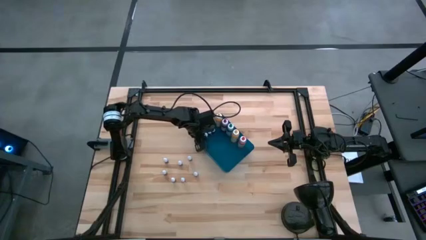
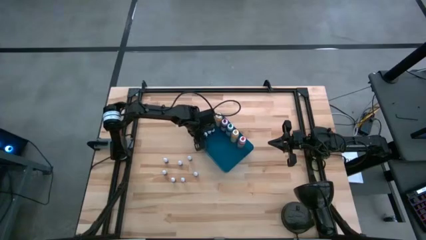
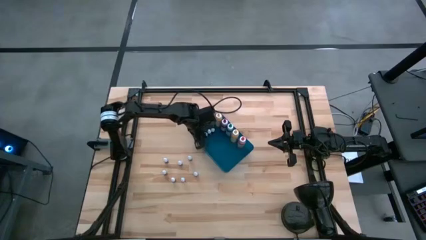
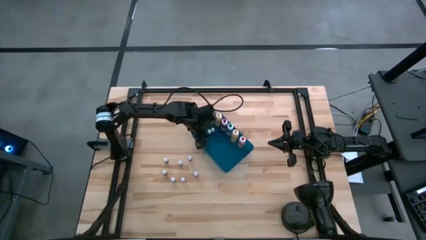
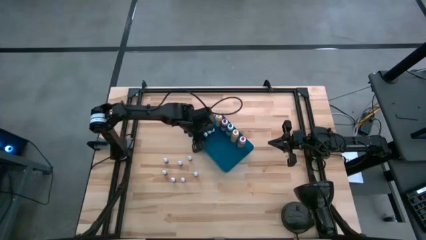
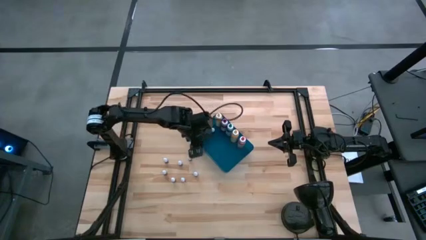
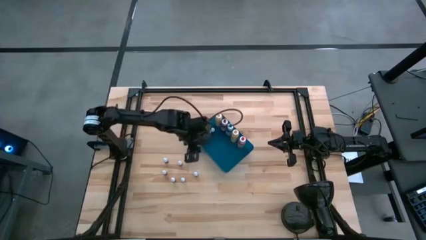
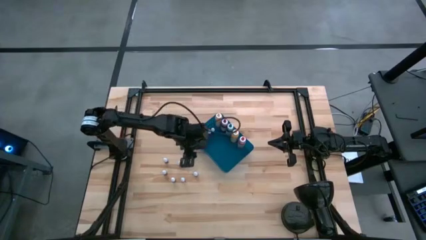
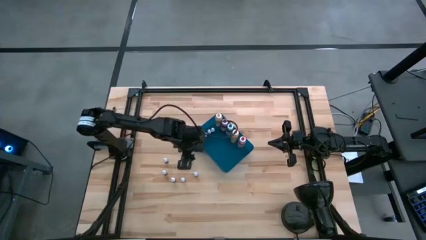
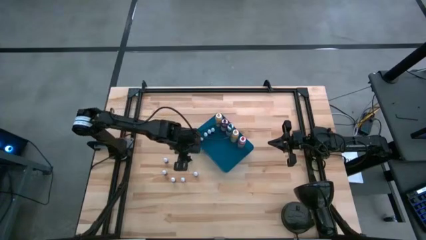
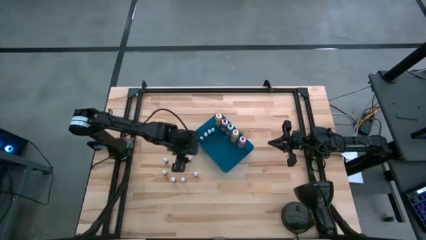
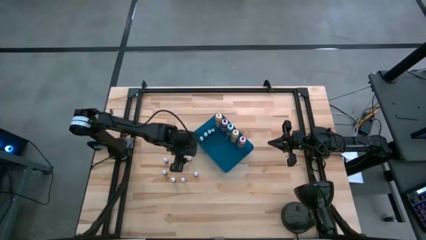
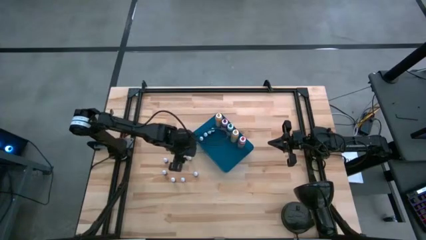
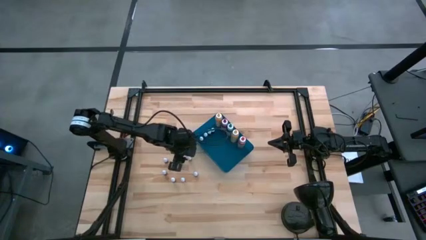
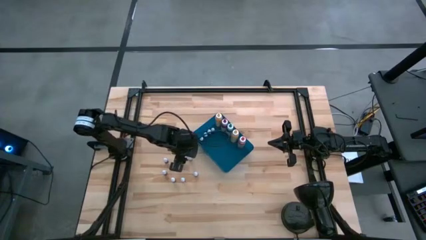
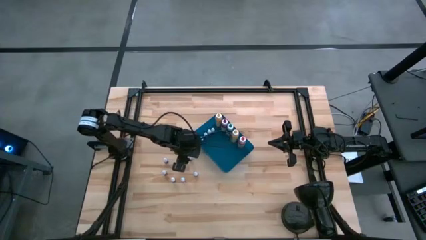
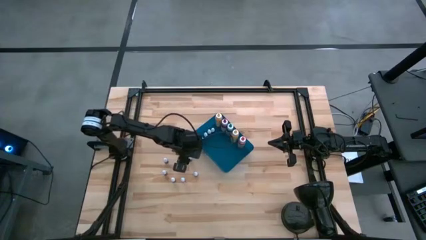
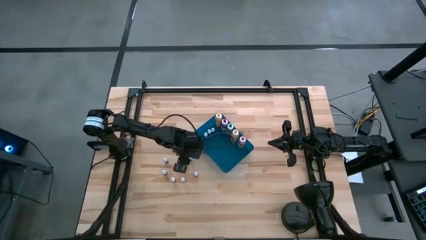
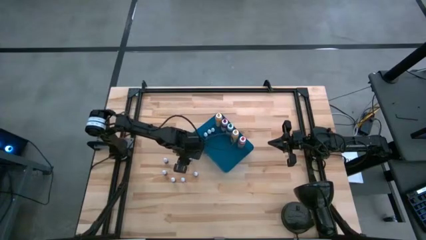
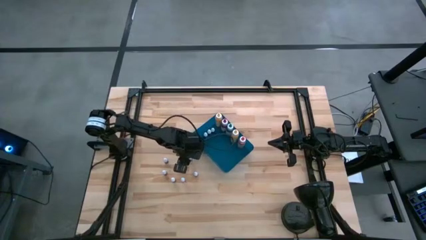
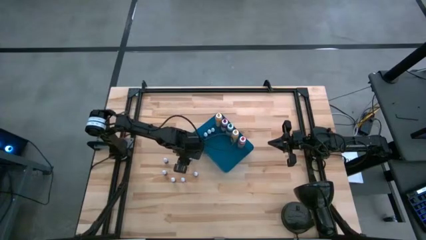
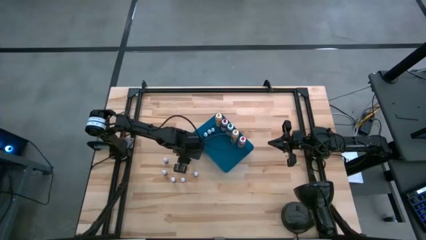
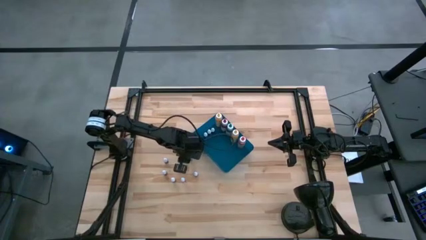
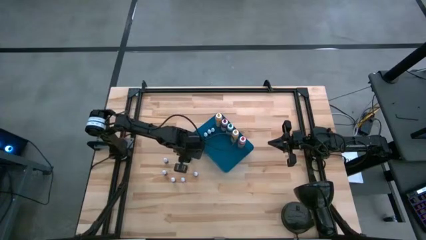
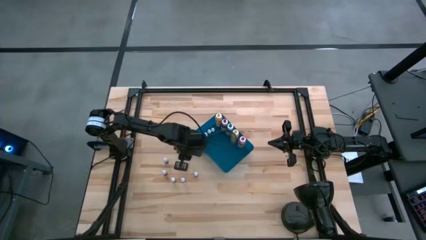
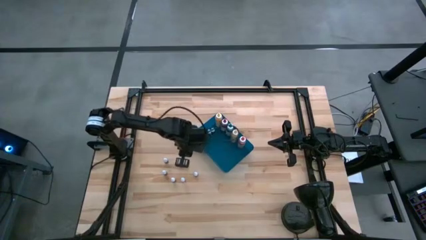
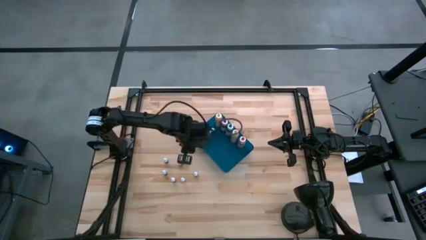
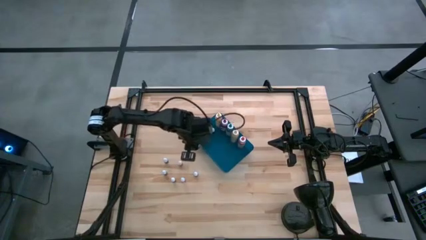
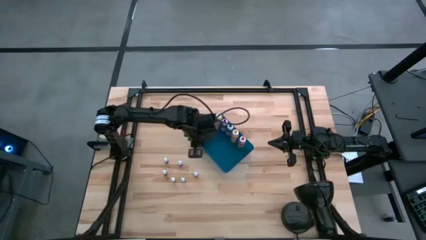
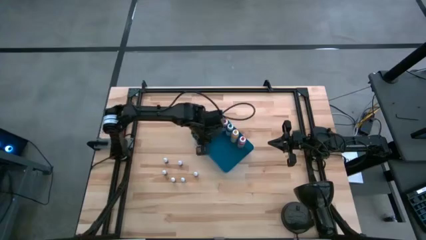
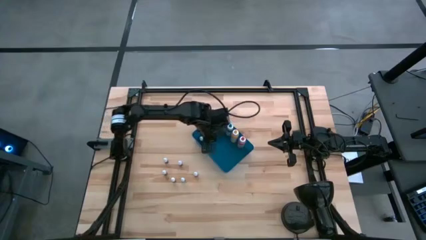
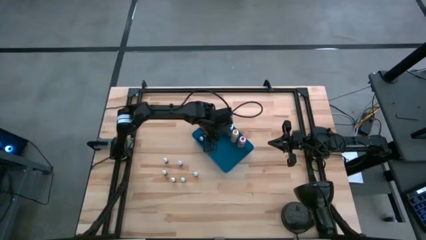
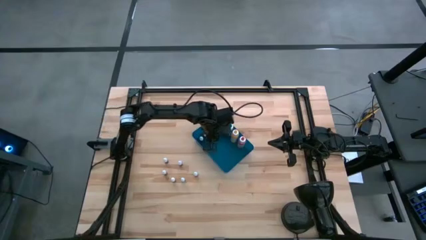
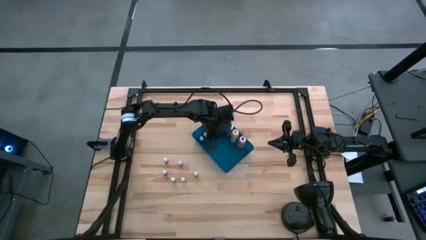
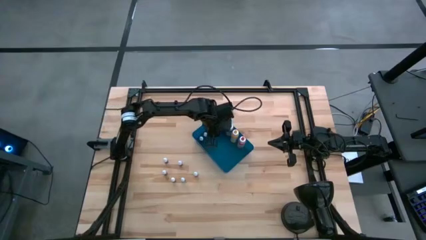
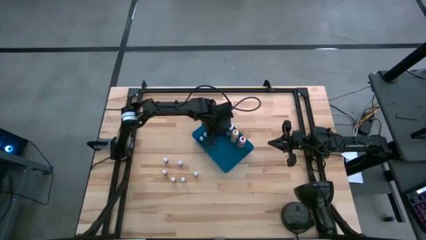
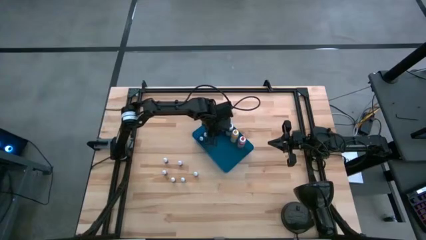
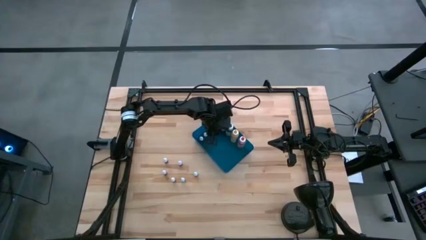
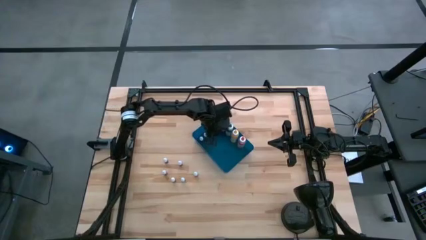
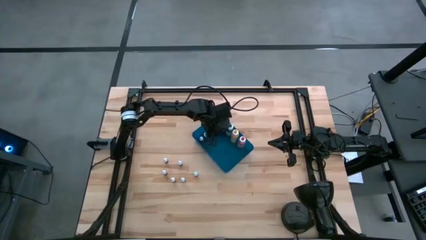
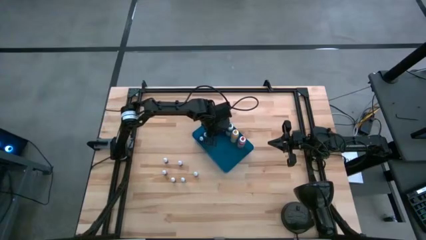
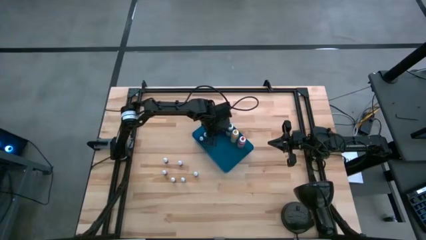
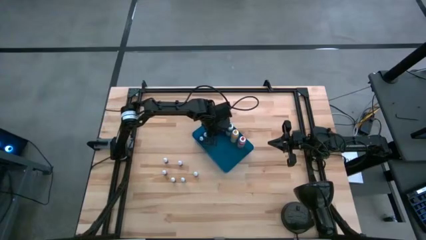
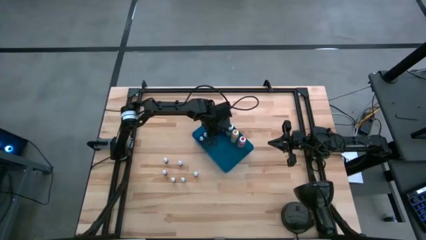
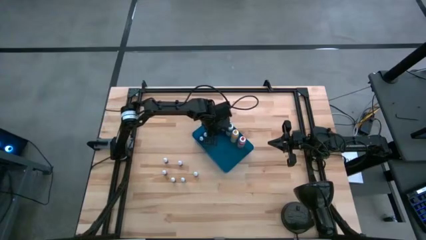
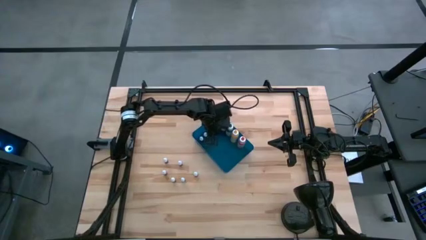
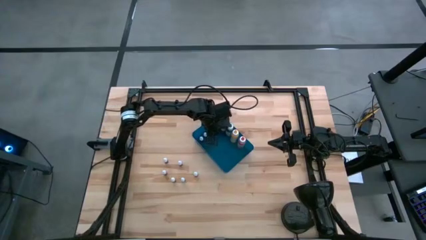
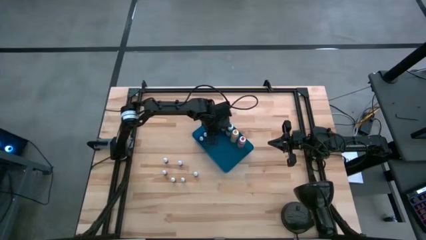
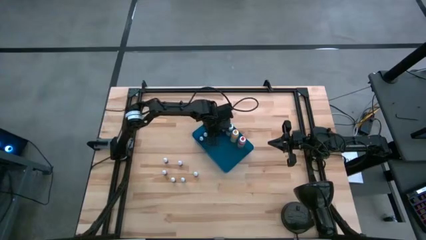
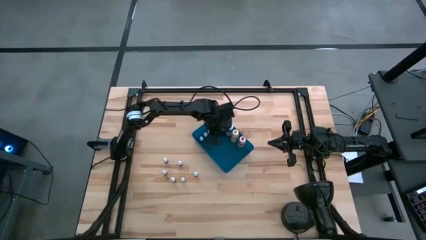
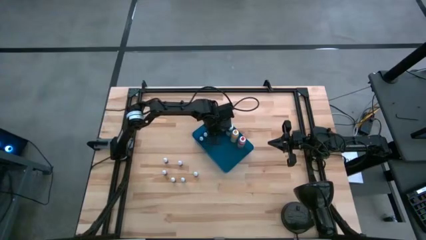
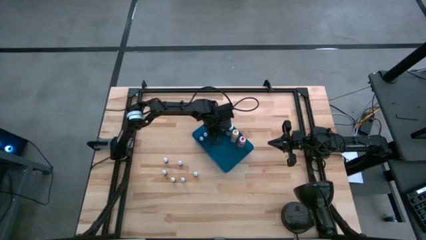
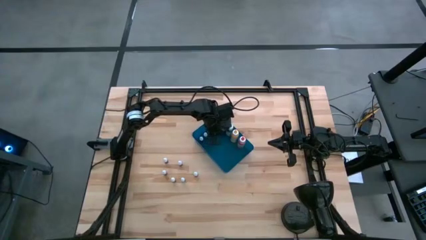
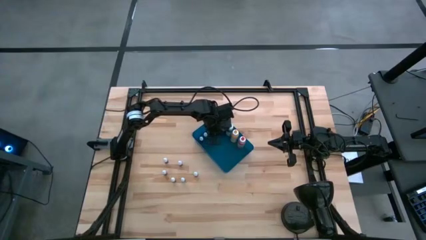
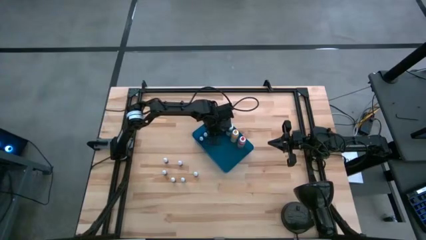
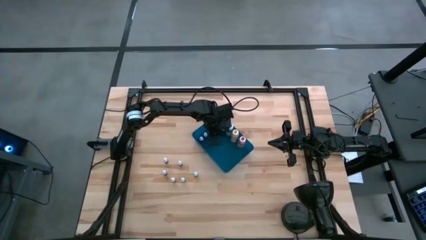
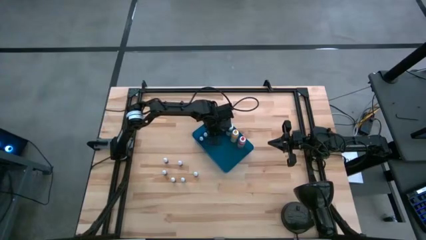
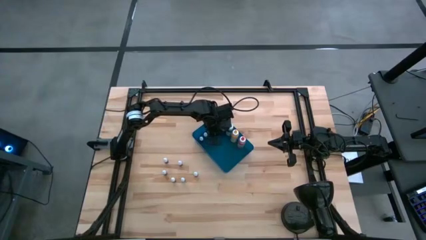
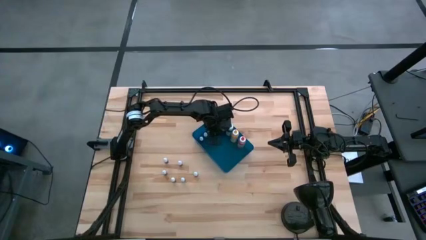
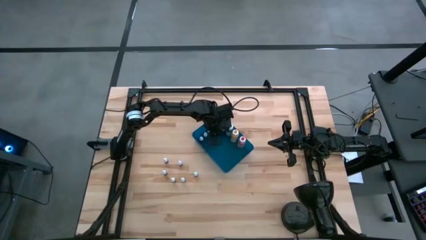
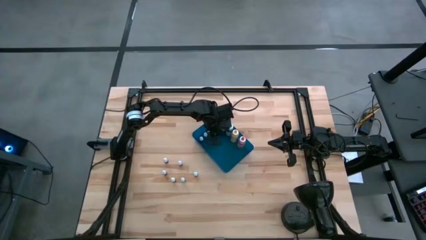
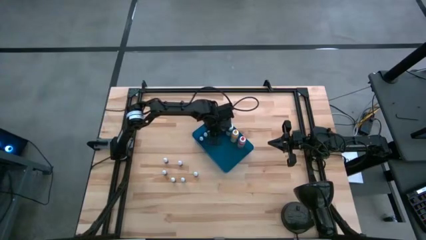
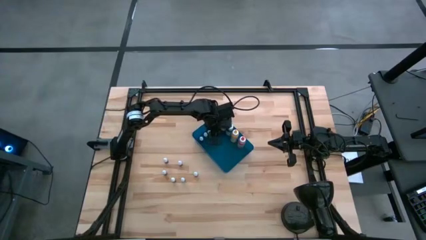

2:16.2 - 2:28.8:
Task: Pick & Place food coloring
Put the blue food coloring bottle into the blue bin

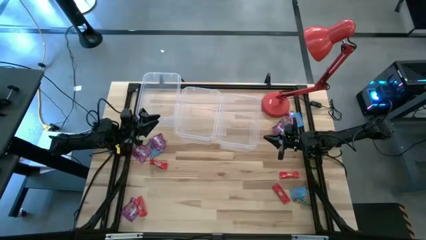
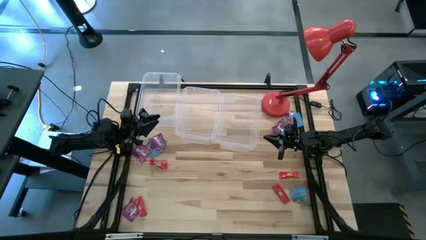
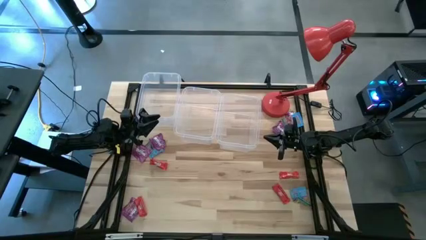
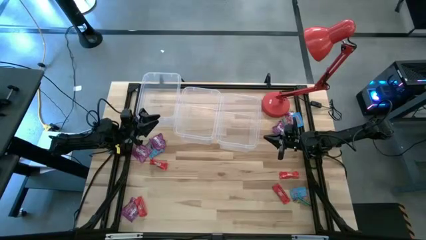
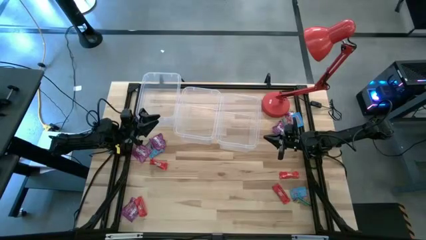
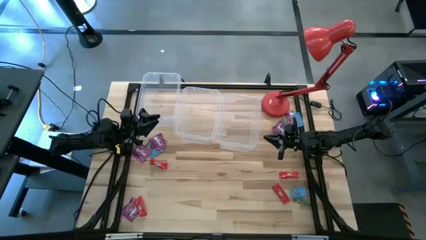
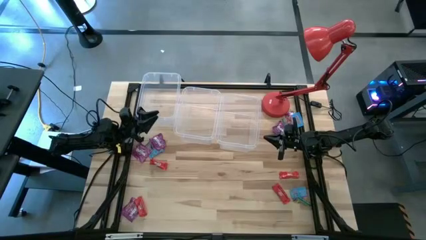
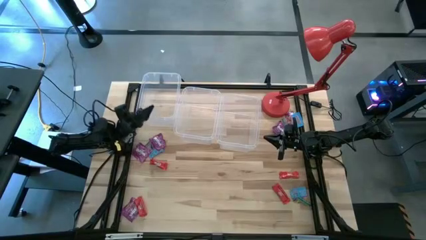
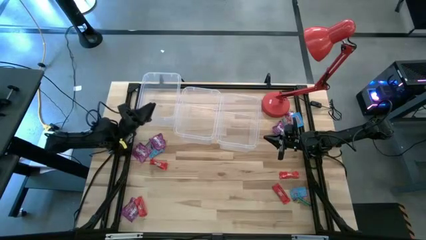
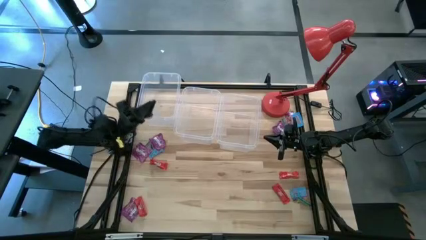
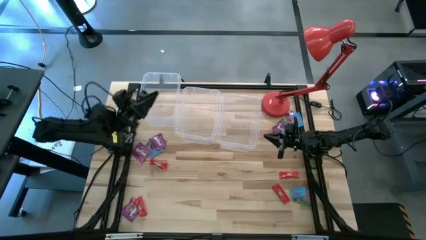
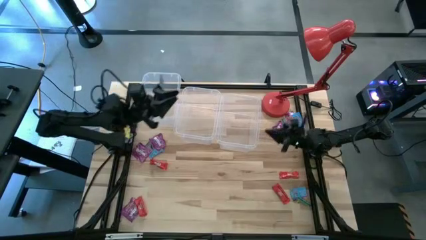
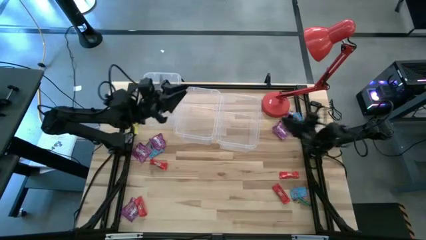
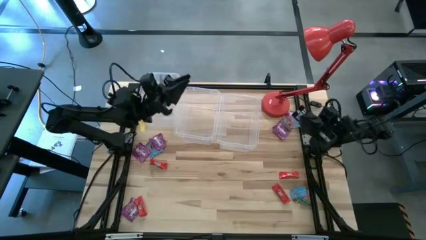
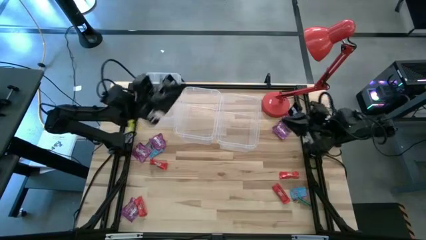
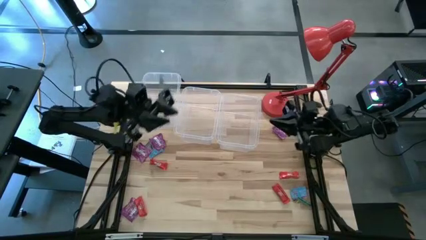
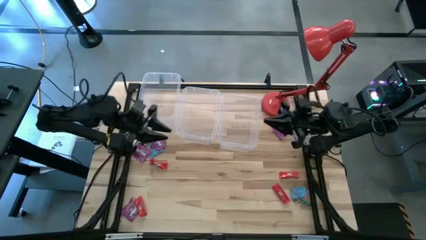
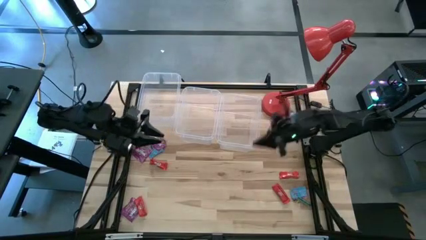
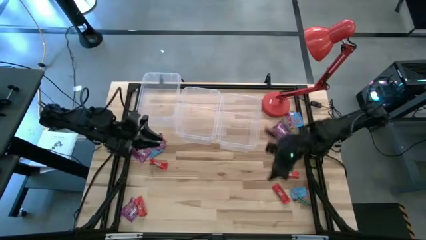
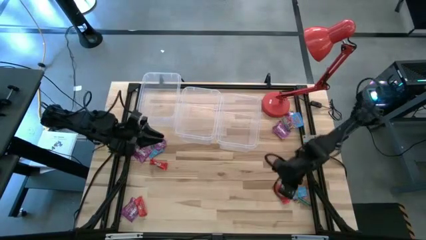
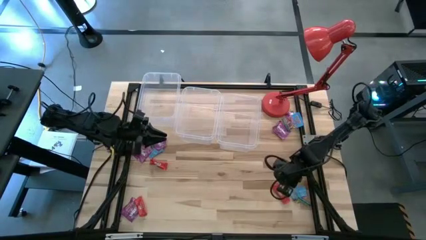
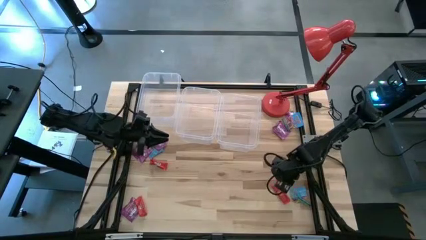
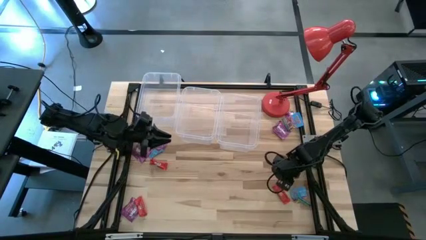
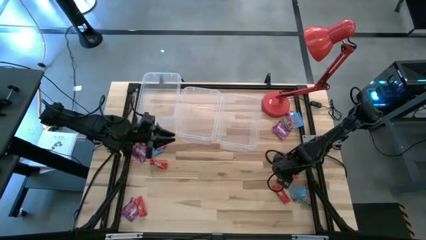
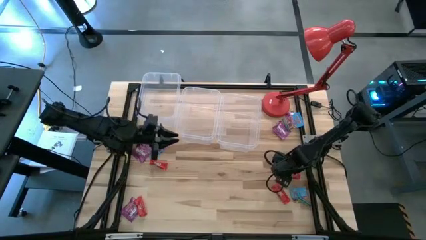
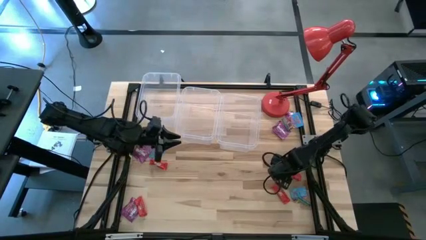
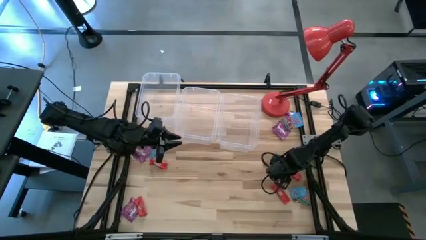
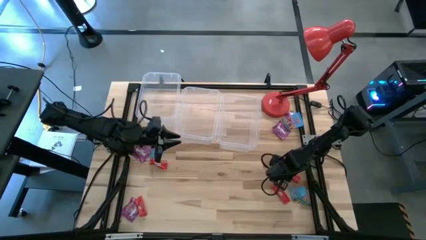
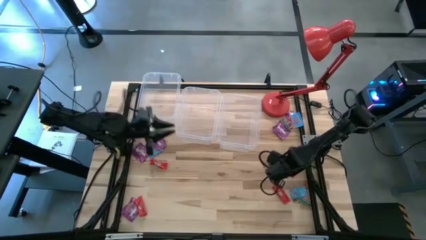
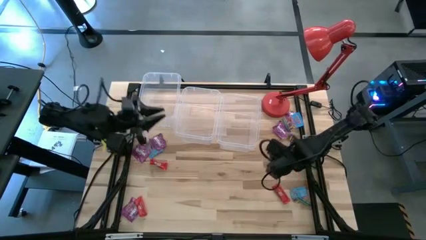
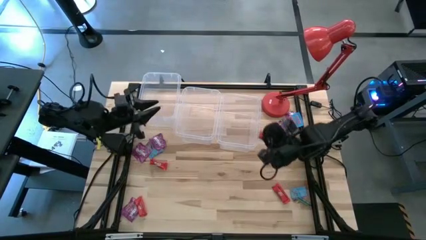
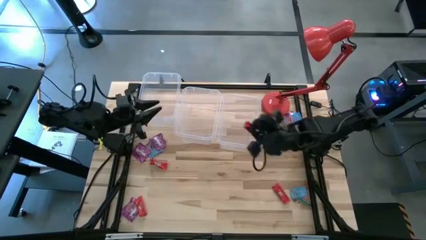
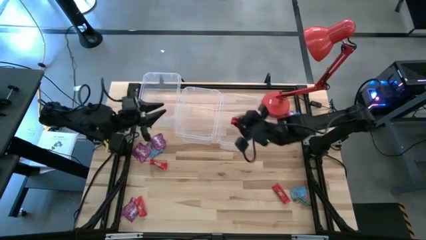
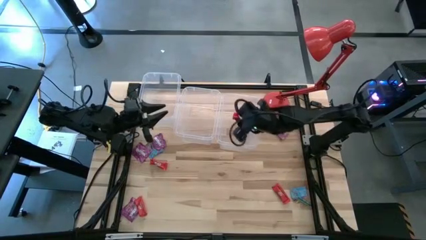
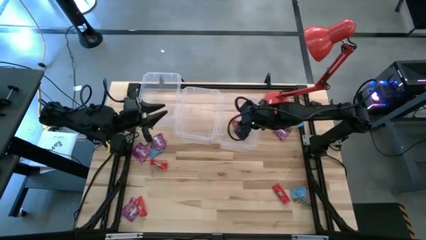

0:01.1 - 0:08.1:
Task: Sort candy
Put the top right red candy into the top right transparent bin
